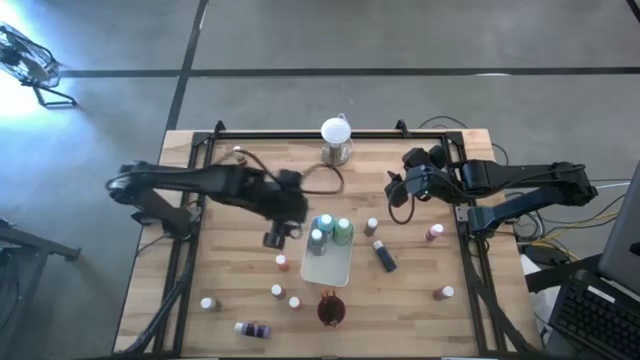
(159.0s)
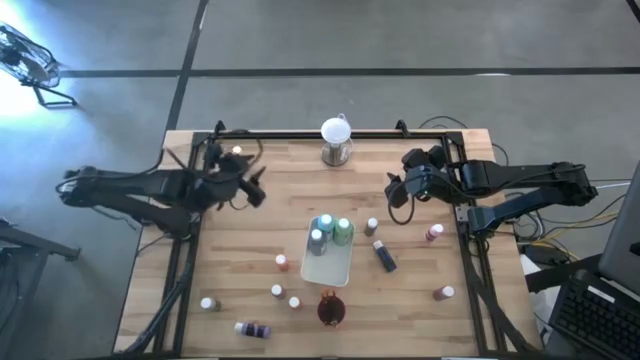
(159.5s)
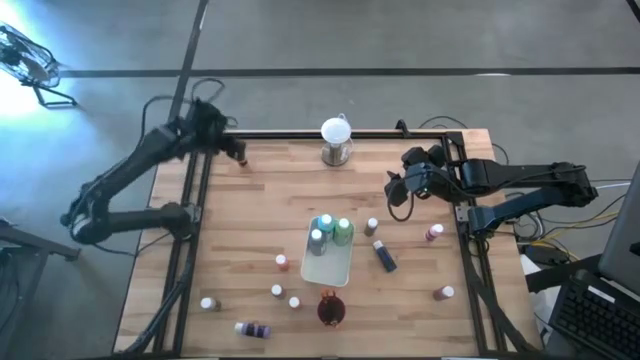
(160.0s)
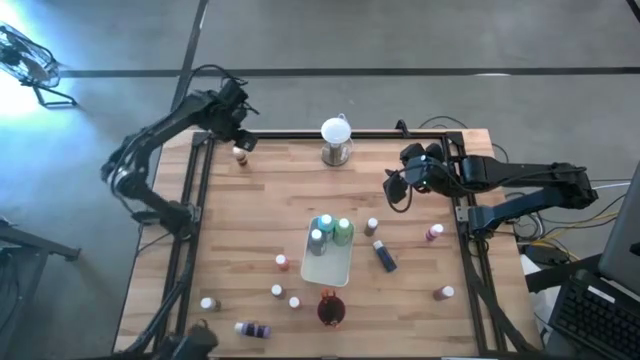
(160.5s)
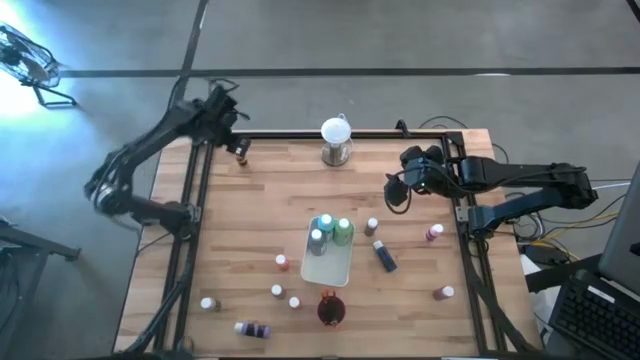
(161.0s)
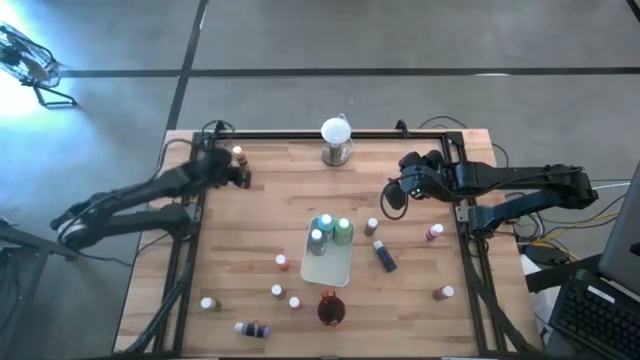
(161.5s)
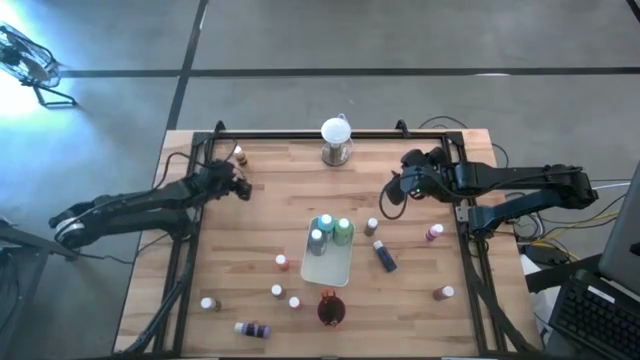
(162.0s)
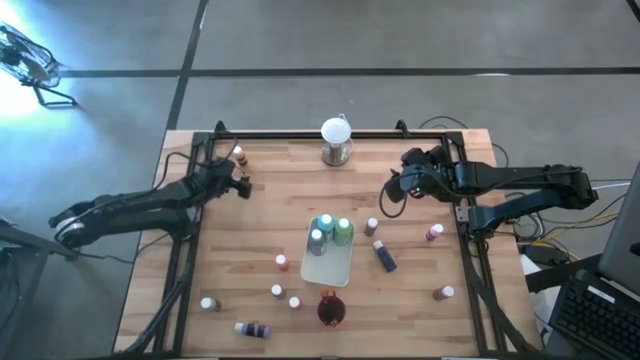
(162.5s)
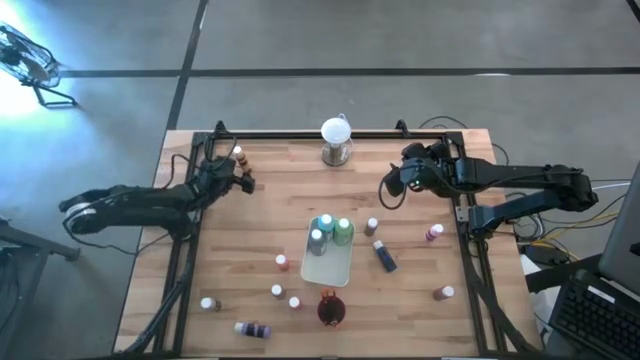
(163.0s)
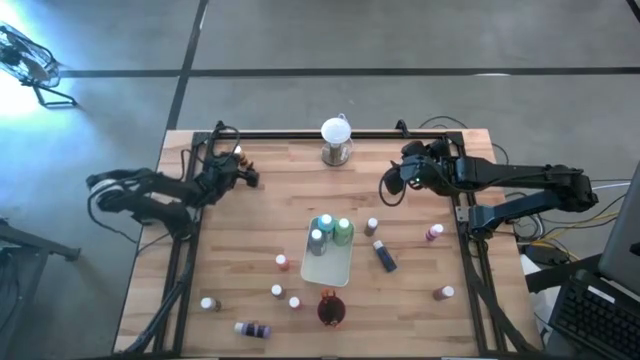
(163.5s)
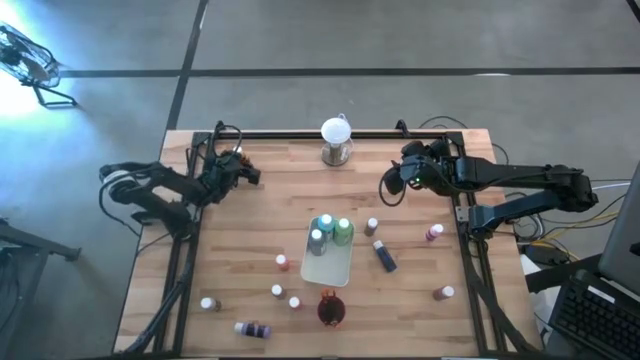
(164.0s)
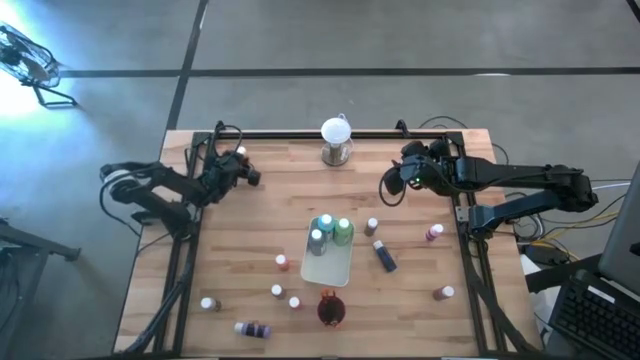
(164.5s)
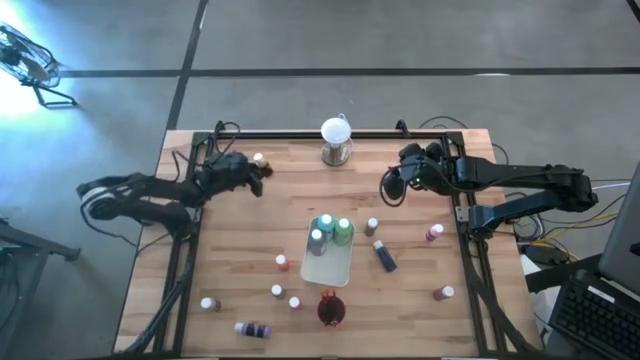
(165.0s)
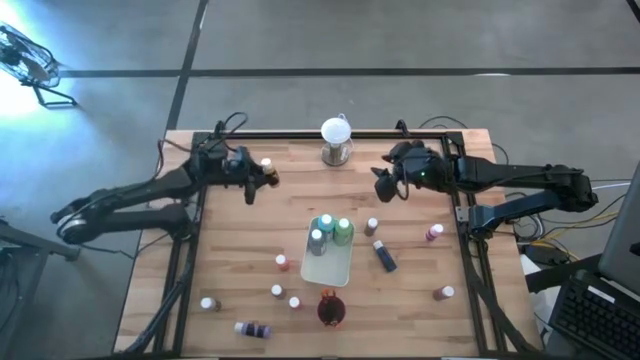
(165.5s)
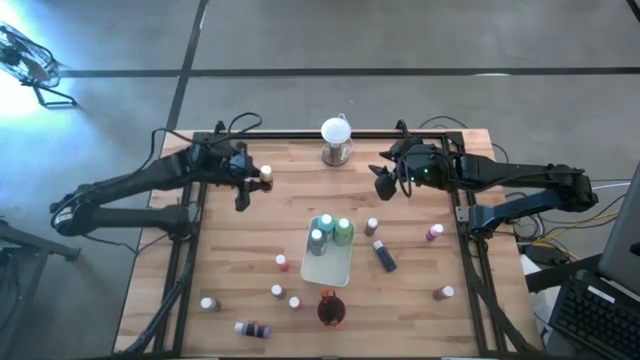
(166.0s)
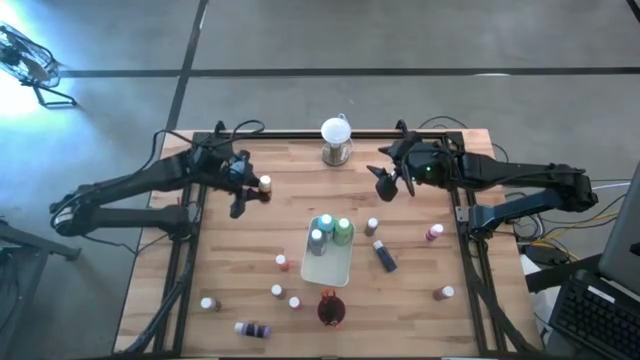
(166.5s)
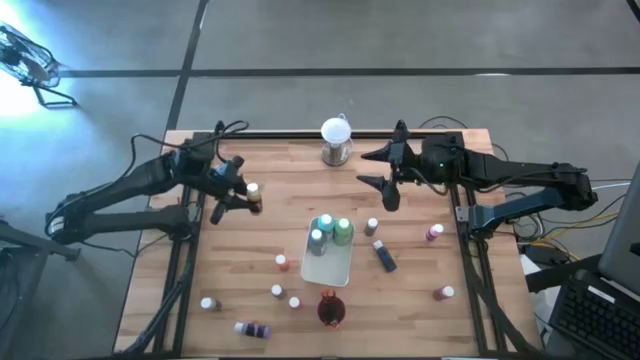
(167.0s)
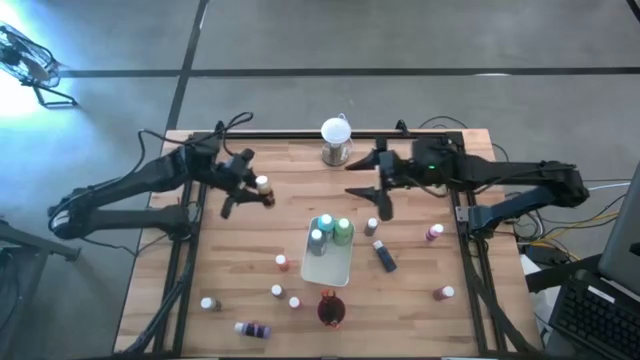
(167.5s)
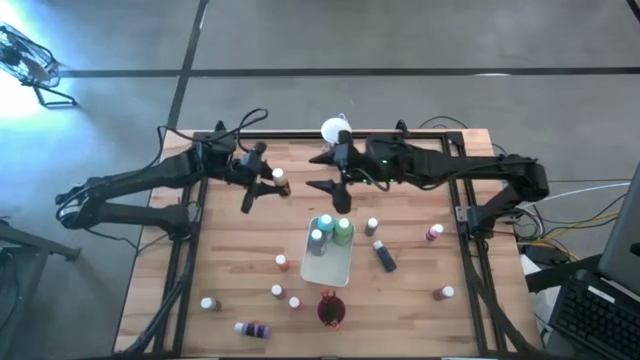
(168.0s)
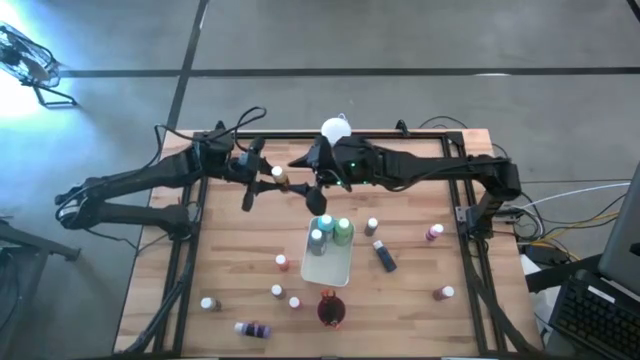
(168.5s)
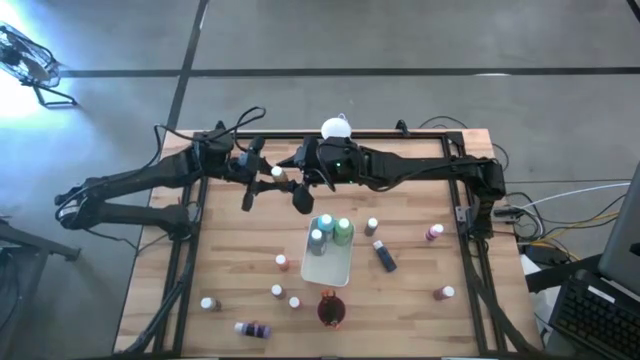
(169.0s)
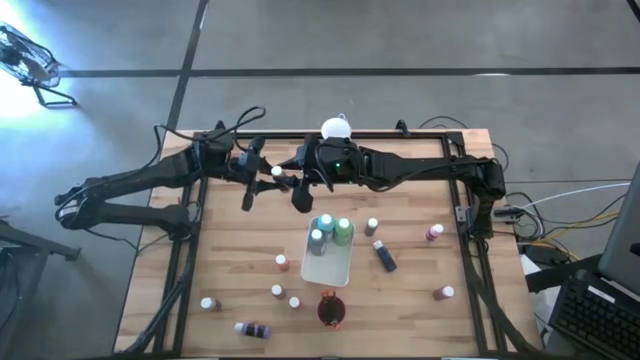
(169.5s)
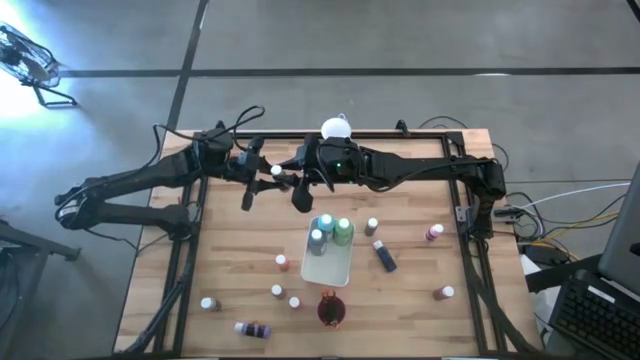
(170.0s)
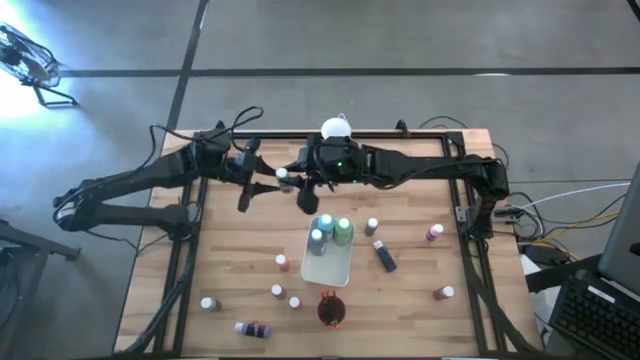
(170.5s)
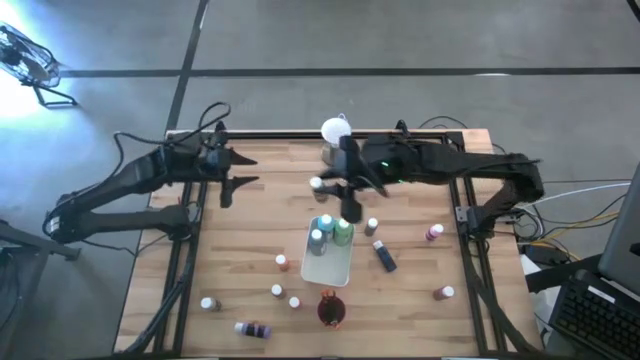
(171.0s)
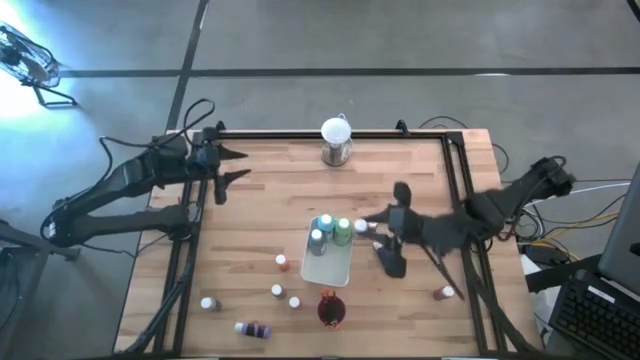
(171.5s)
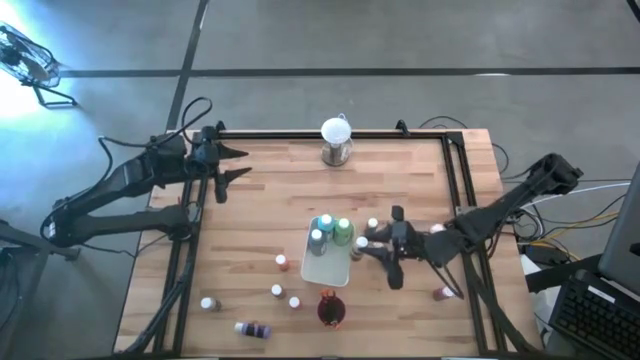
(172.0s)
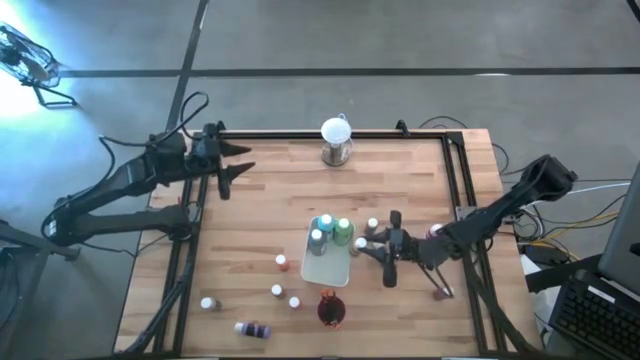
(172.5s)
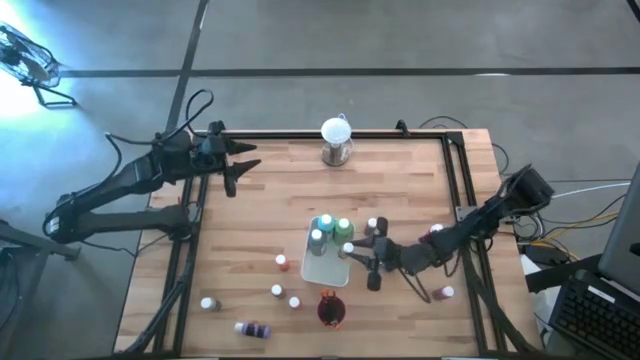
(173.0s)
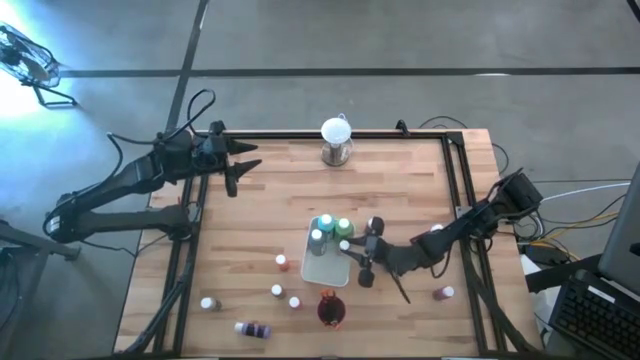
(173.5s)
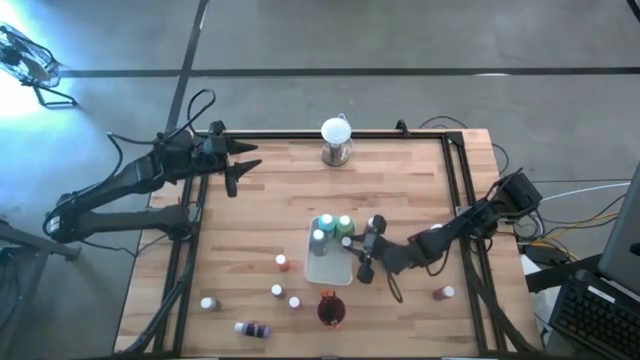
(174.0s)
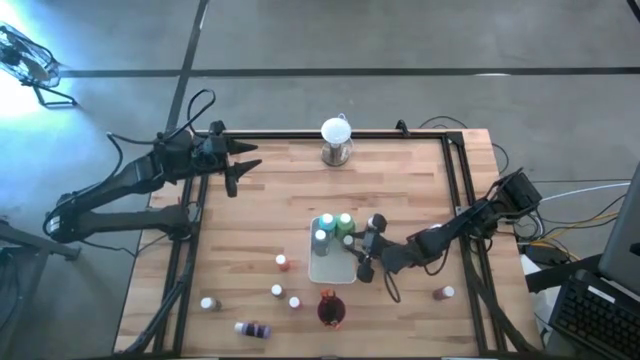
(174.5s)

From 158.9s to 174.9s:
Task: Pick & Place Paint Supplies
Put the yellow paint bottle into the white bin

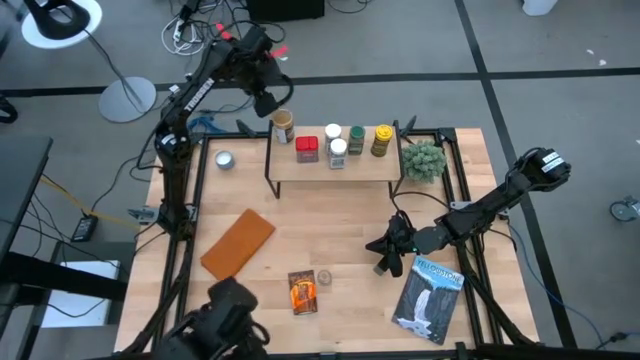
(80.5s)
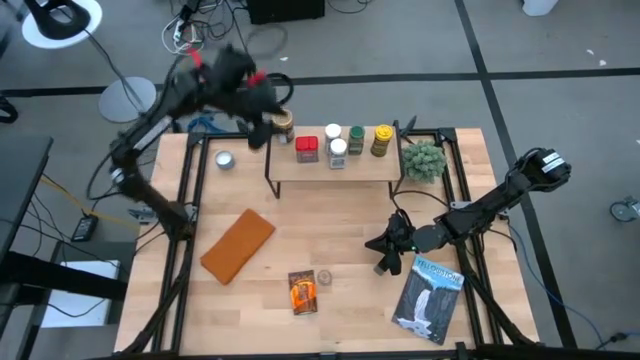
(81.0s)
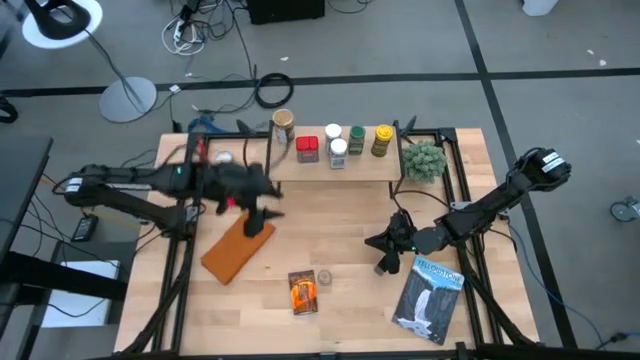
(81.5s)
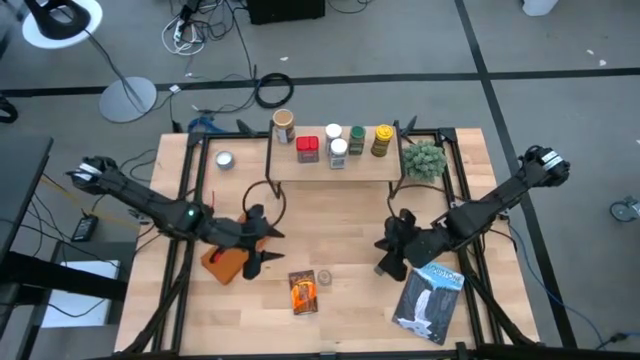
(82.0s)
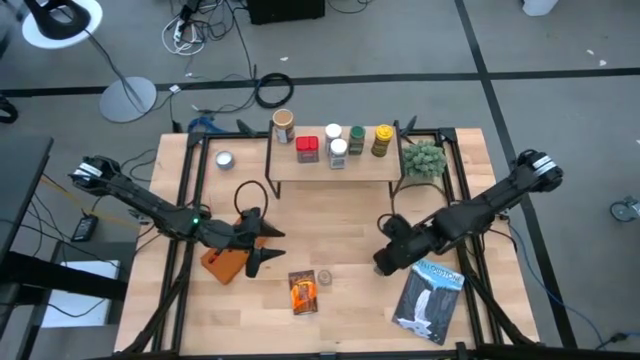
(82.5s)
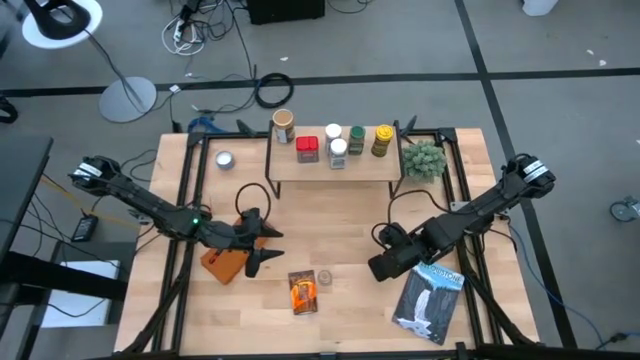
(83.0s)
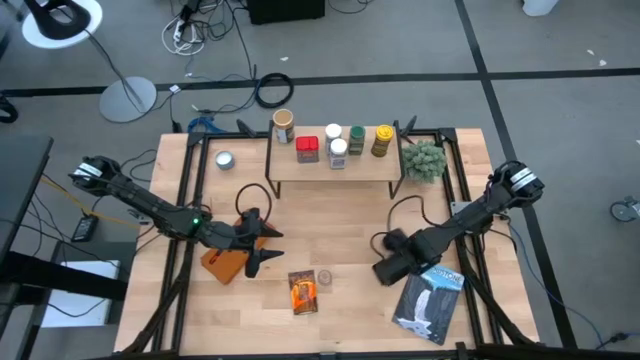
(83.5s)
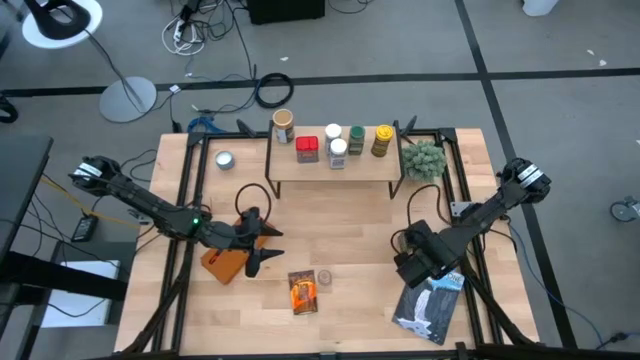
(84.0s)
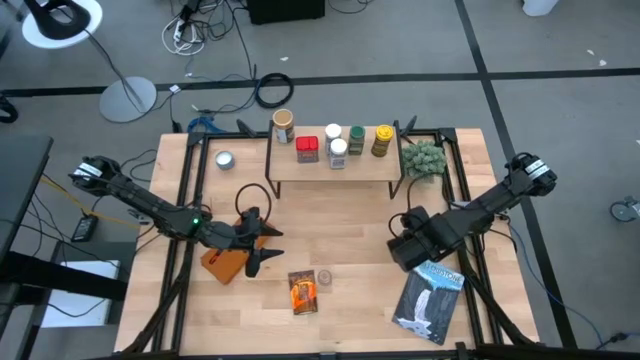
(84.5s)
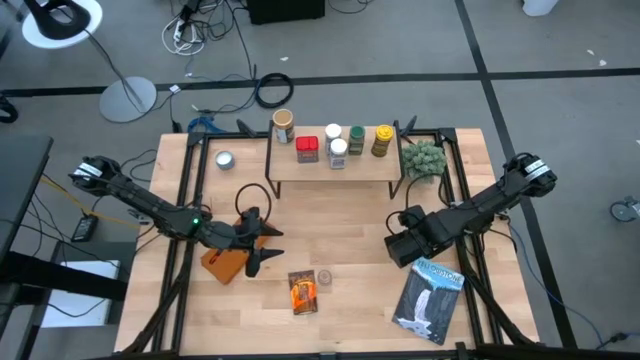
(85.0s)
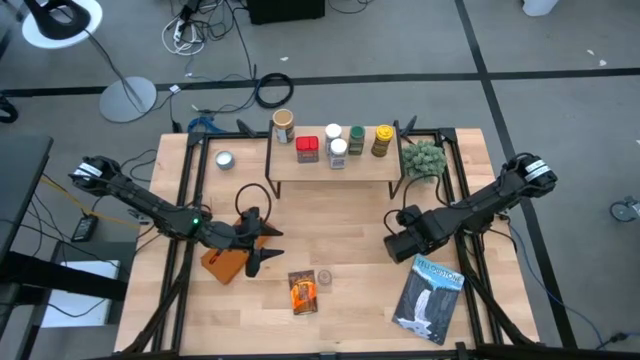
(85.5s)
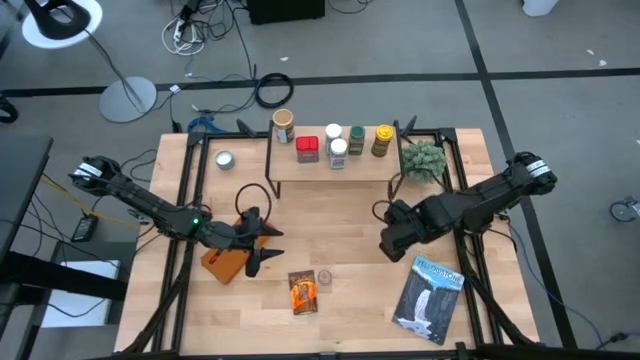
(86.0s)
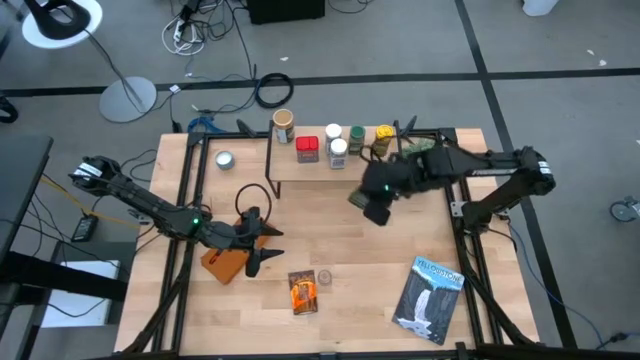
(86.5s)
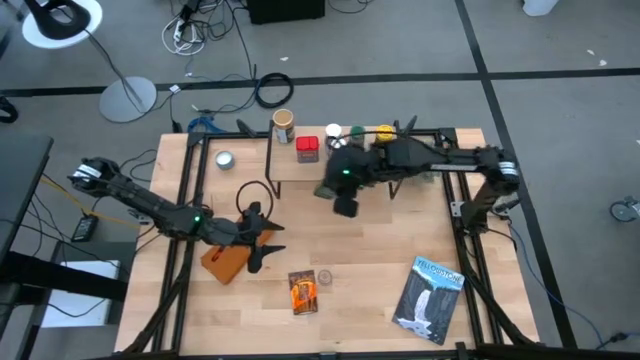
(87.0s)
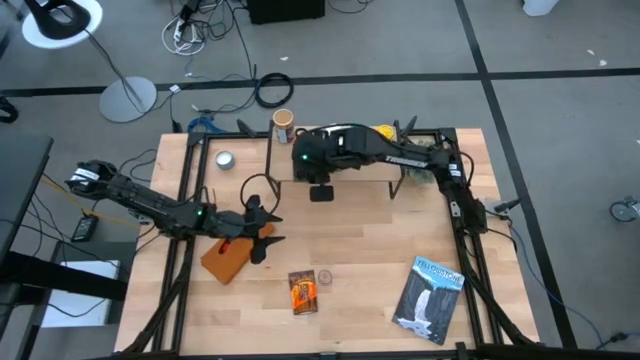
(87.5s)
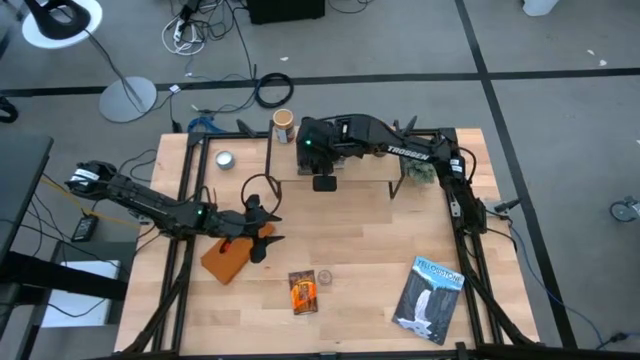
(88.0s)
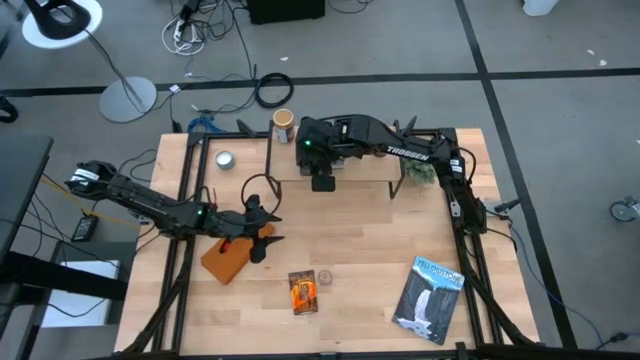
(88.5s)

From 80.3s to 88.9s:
Task: Shelf spices
Put the green seasoning can on the shelf
